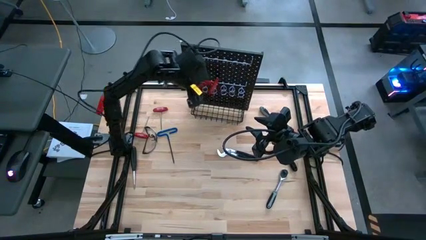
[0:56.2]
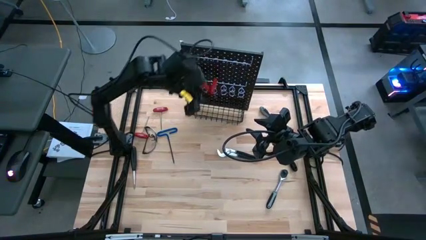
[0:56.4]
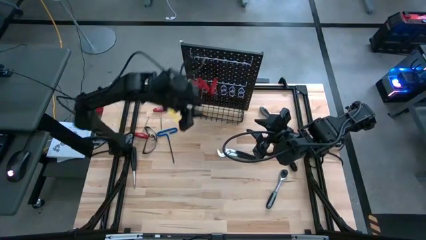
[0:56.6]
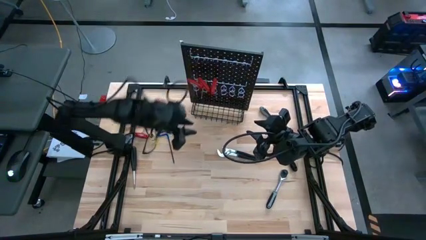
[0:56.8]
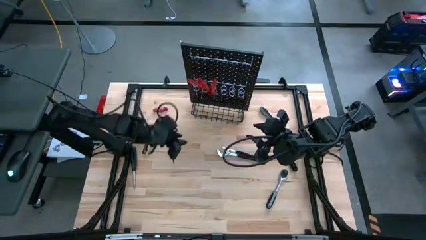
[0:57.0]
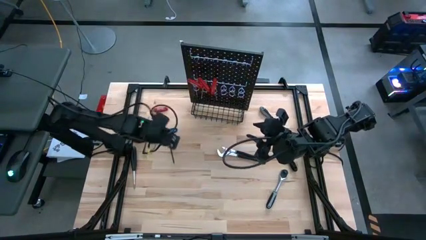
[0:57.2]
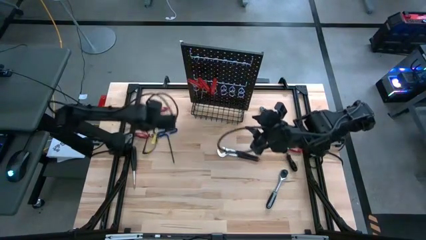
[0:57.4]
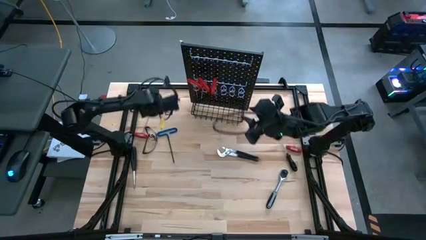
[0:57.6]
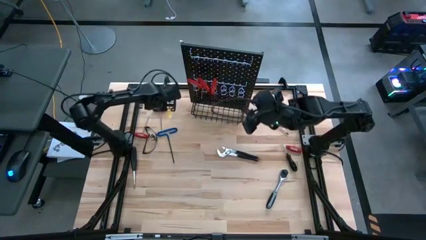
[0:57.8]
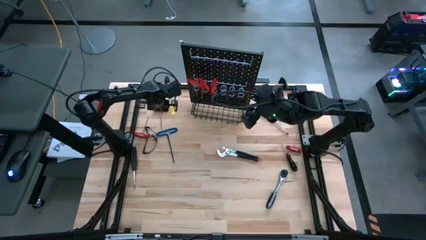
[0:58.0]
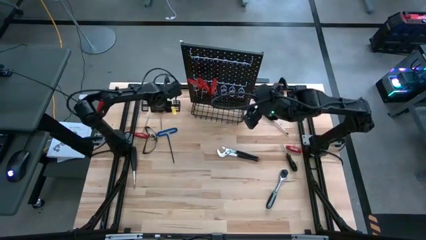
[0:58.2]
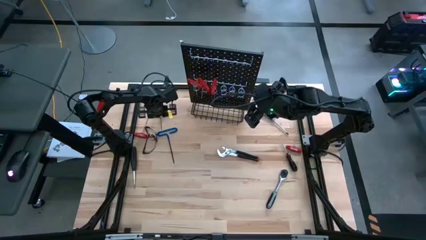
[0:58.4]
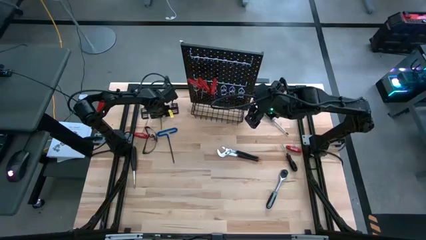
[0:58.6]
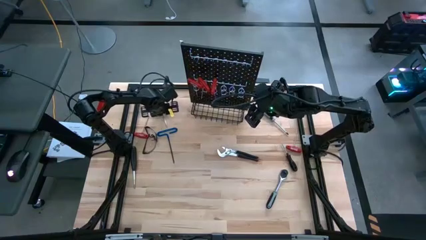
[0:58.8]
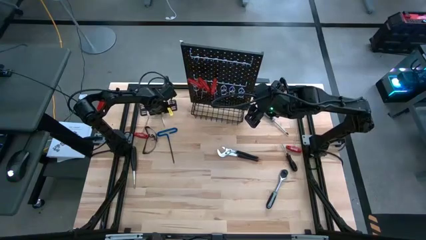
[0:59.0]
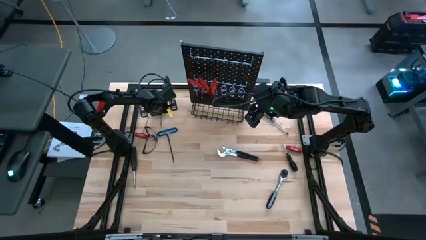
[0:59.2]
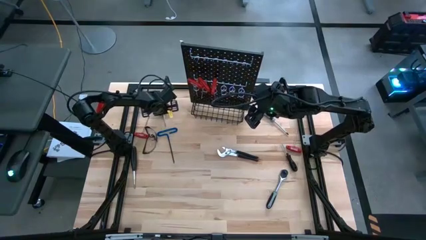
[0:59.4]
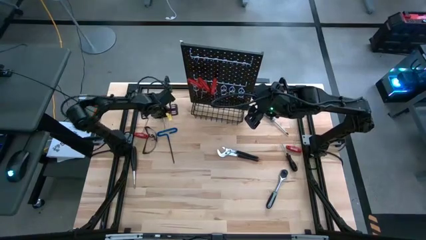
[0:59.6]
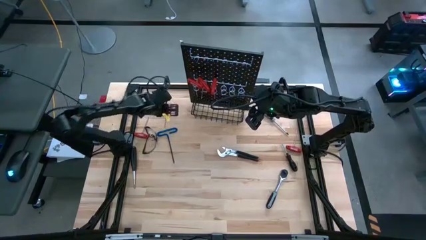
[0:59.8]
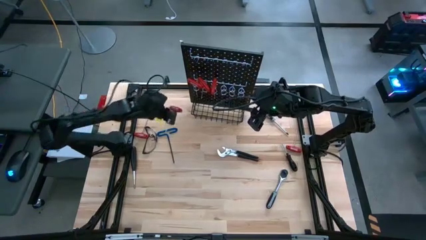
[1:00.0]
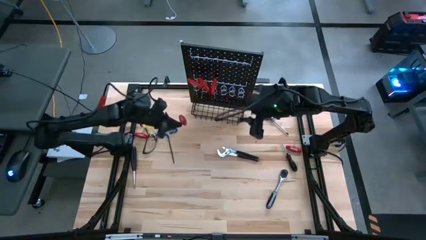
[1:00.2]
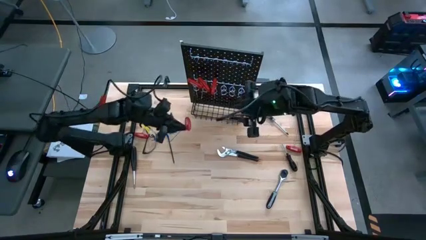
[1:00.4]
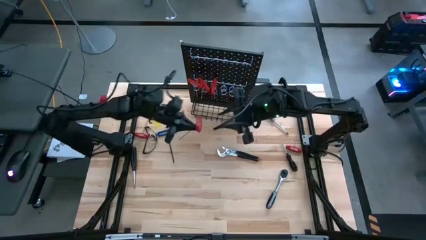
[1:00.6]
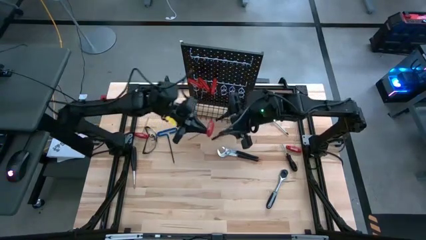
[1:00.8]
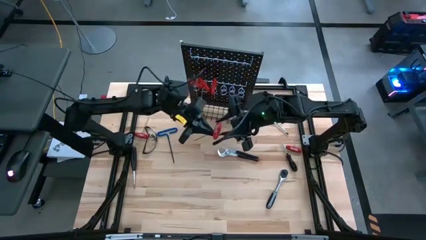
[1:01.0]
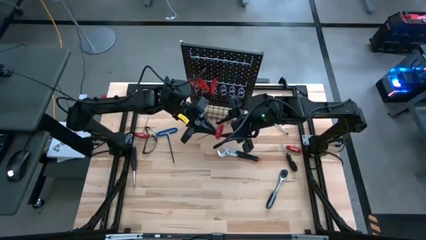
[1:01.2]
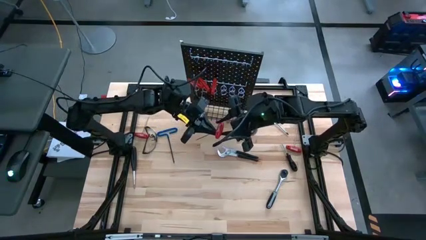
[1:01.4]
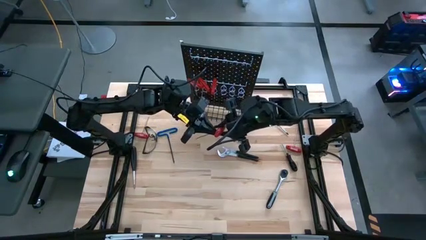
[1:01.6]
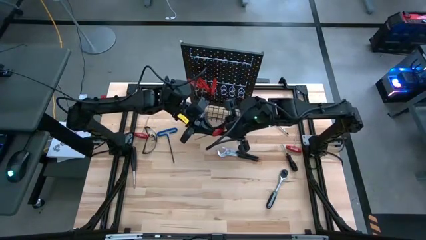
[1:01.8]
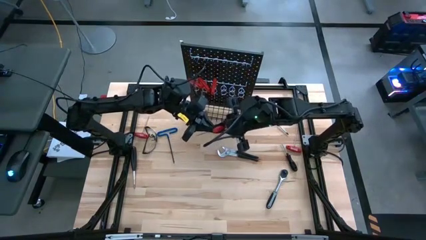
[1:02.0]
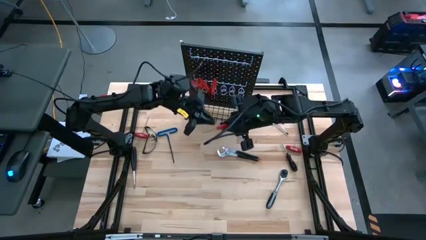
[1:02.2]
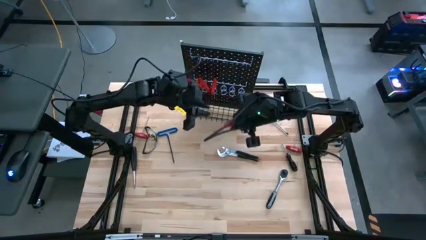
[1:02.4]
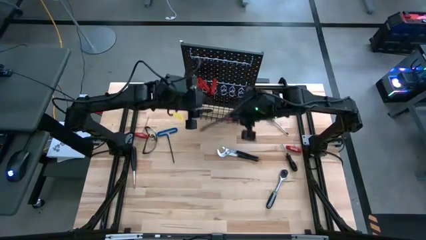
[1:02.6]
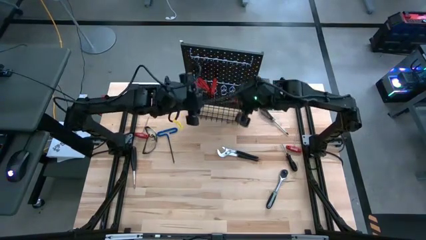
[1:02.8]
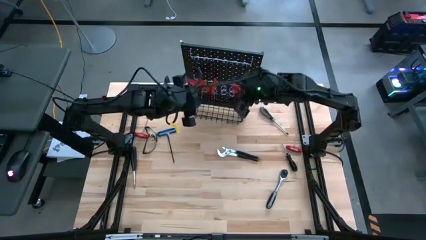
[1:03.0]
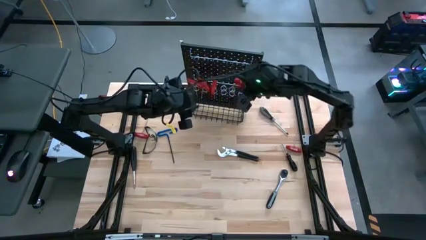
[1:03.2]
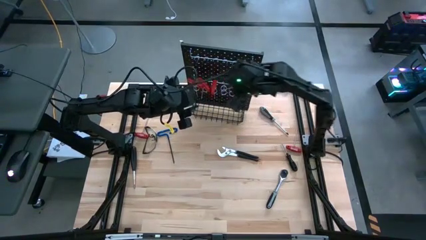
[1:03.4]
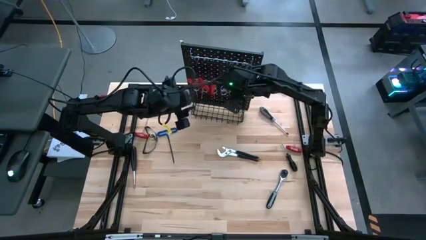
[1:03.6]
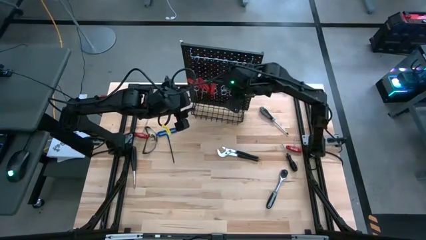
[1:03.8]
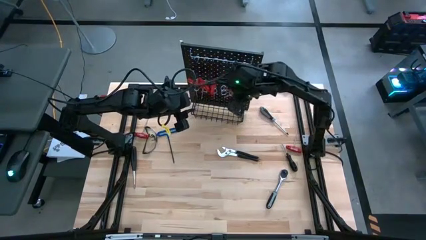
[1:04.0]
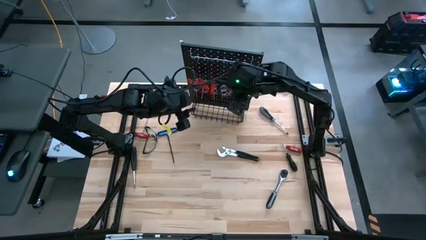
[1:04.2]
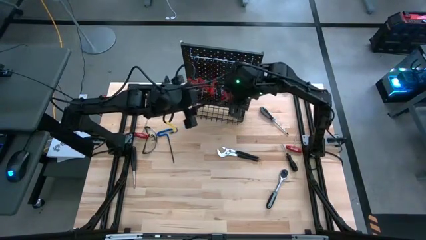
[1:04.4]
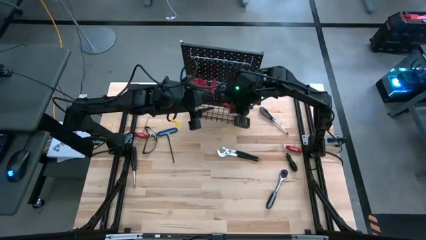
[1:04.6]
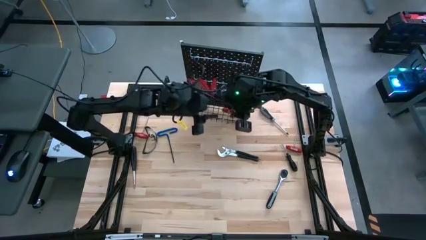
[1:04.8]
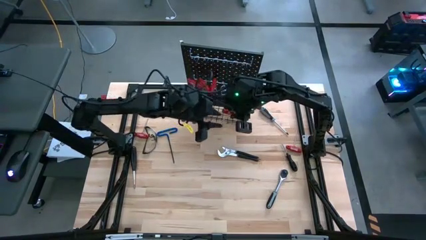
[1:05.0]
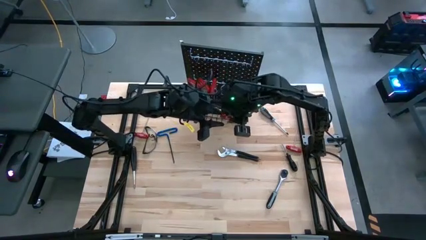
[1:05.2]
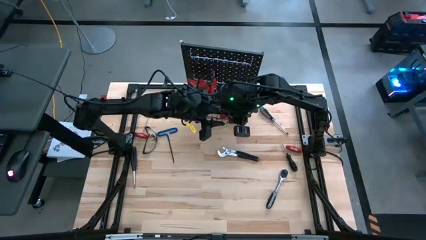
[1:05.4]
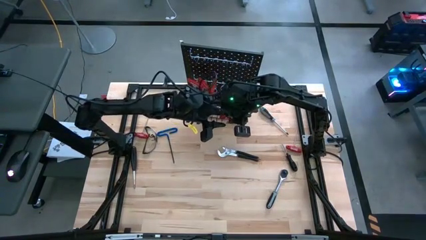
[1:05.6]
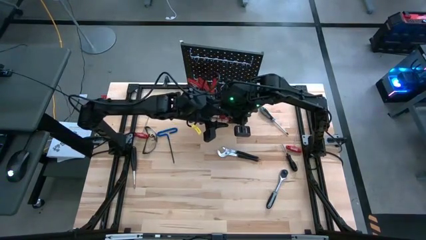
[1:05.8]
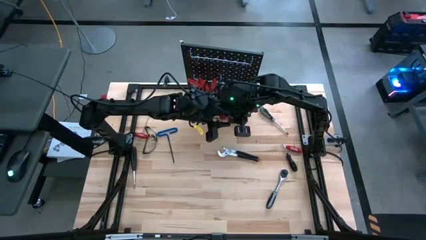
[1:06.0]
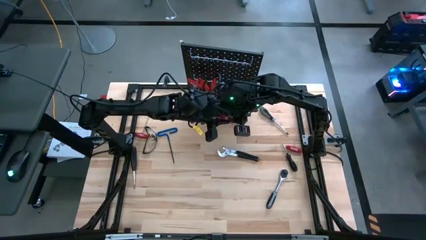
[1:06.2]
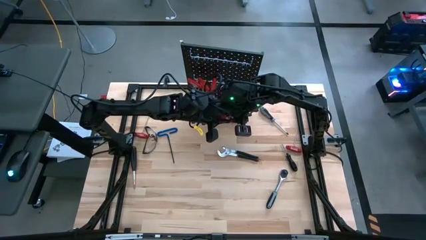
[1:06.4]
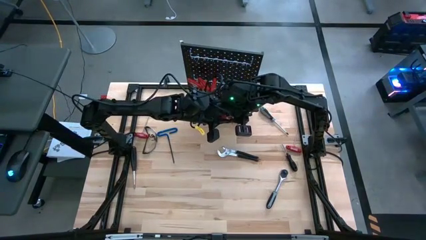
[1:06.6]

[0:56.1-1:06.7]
Task: Hang tools onto peg board
Hang the top red allen wrench on the pegboard

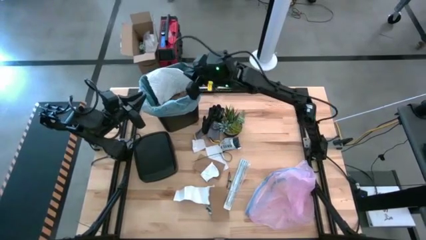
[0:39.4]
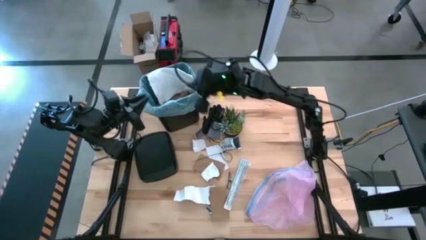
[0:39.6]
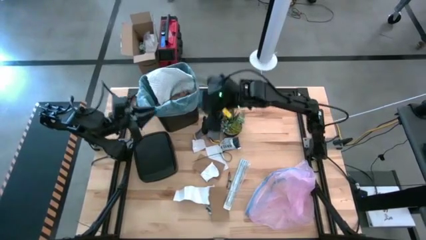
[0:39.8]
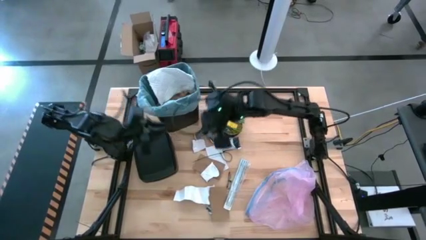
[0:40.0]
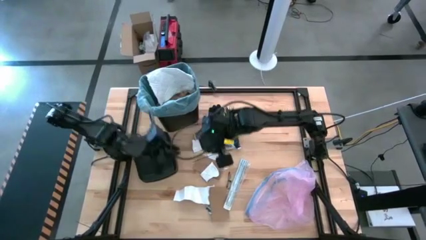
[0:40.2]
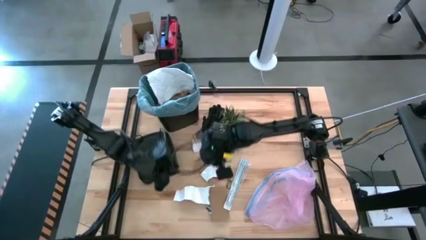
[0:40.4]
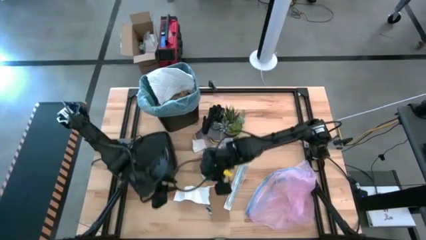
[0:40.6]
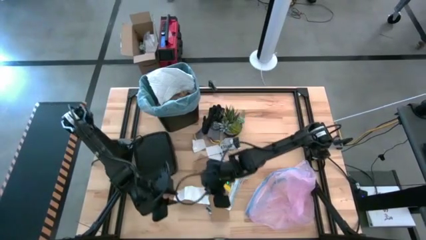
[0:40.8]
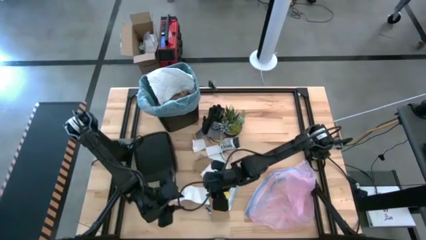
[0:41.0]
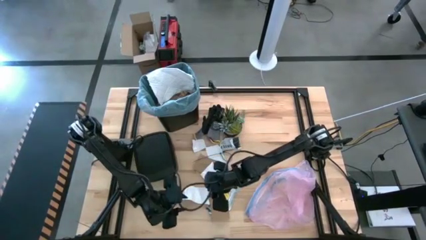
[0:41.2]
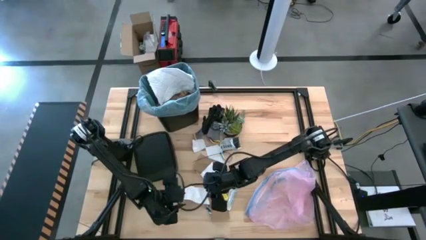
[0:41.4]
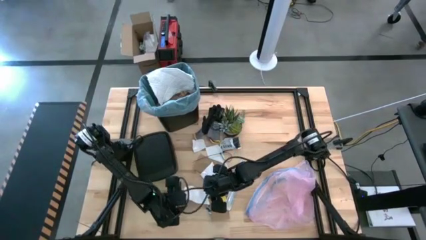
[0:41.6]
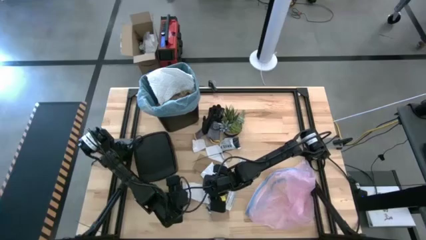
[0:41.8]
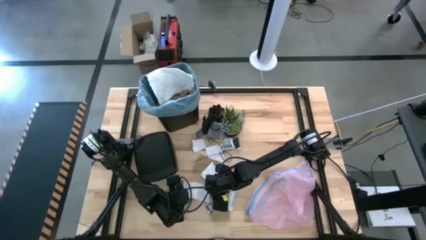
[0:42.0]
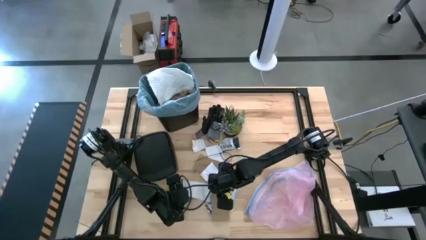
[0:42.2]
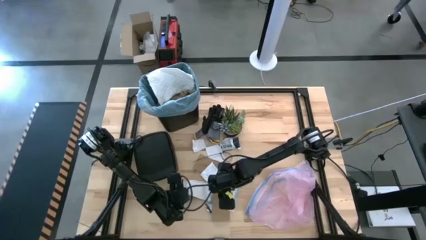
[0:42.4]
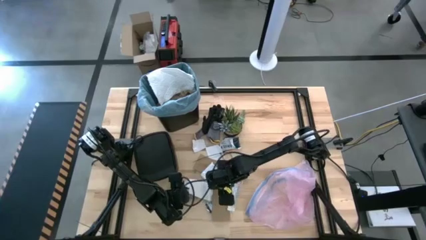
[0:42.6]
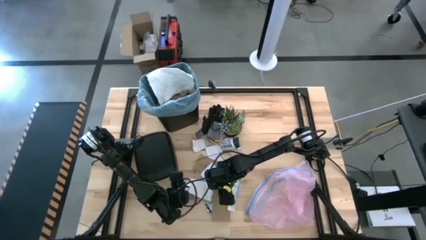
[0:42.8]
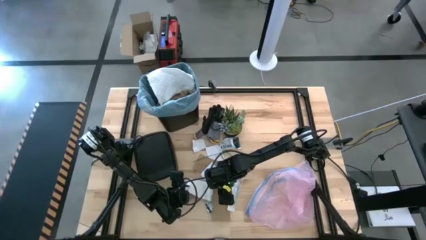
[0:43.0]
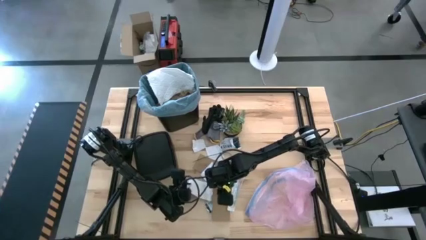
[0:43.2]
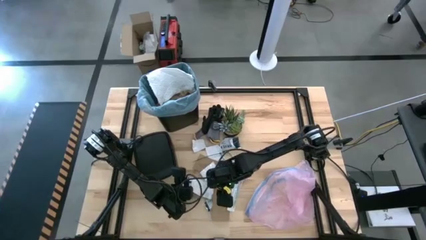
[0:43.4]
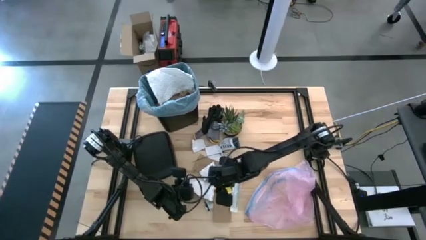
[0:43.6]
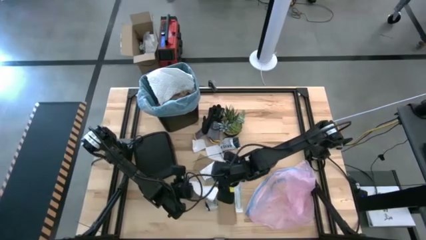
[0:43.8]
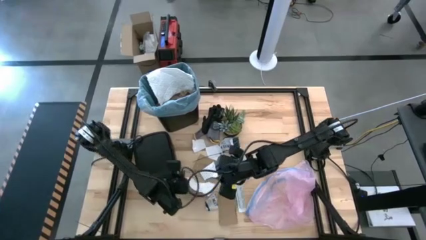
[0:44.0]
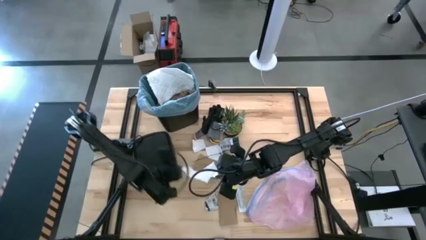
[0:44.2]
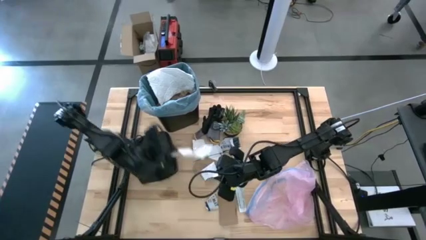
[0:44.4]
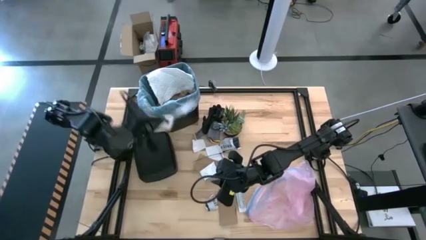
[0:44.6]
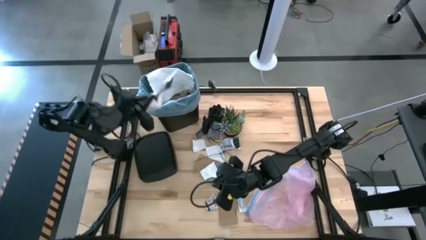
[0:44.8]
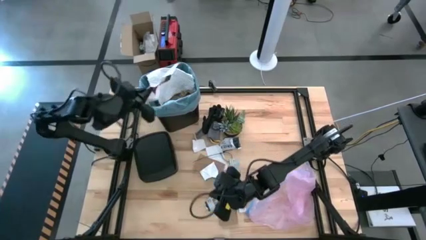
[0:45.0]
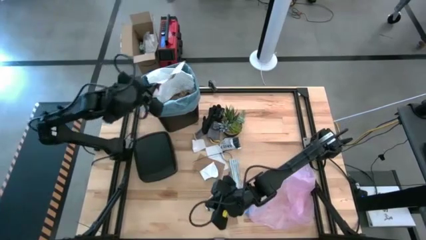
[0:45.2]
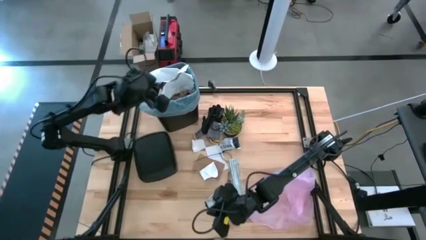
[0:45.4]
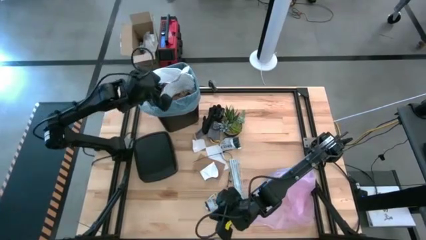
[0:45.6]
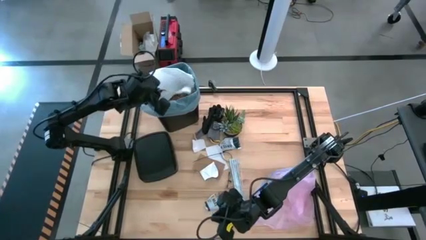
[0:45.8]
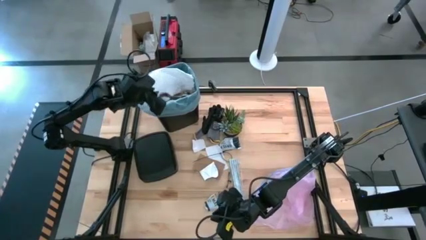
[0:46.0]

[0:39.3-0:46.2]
Task: place trash/remove bag and relplace
Put the white paper into the trash bin
